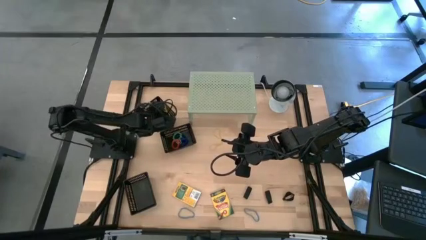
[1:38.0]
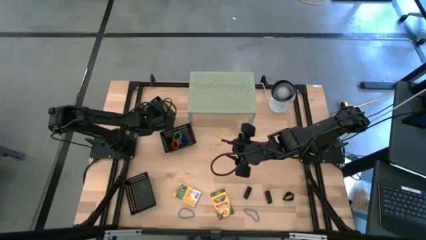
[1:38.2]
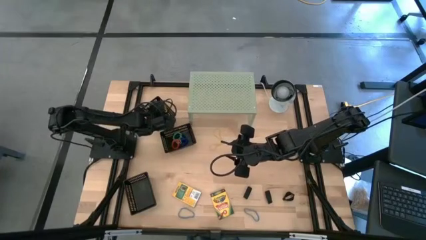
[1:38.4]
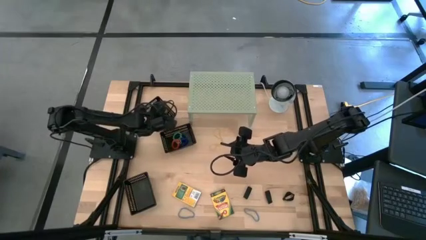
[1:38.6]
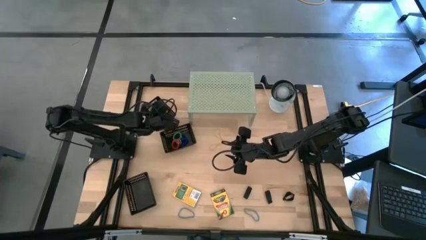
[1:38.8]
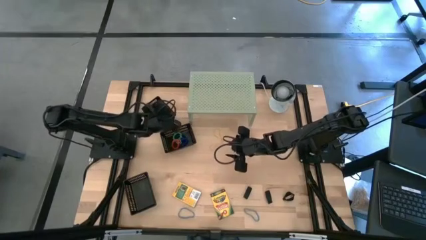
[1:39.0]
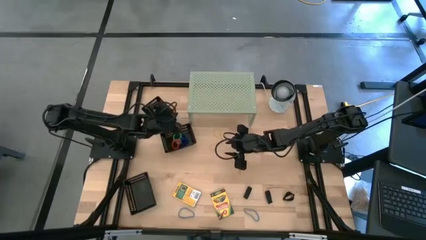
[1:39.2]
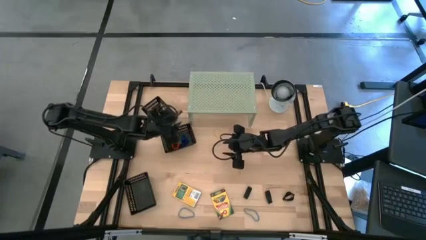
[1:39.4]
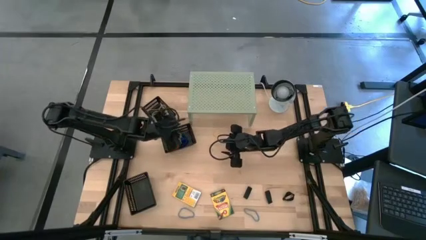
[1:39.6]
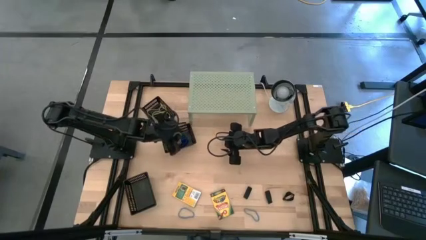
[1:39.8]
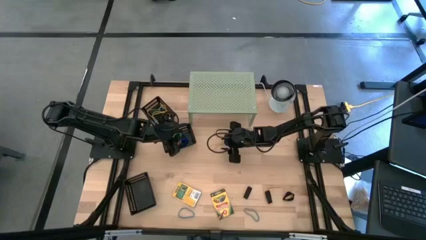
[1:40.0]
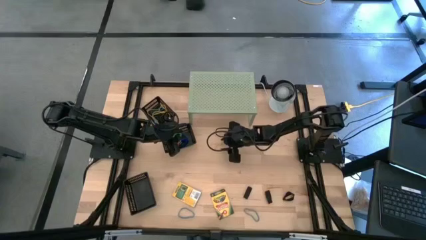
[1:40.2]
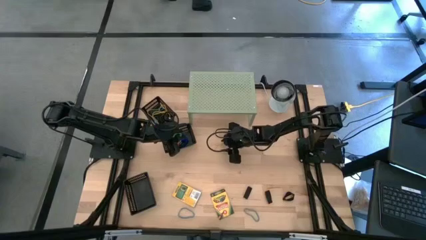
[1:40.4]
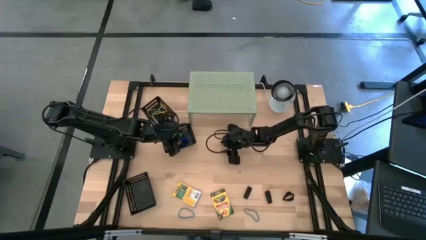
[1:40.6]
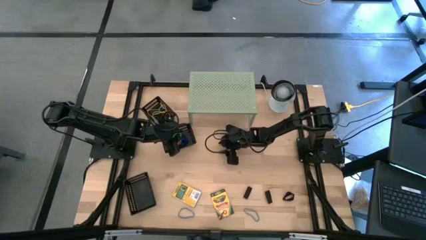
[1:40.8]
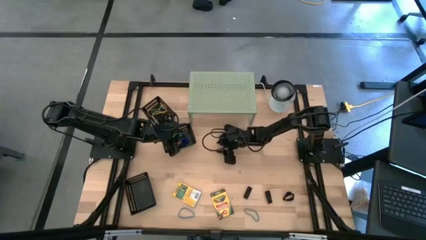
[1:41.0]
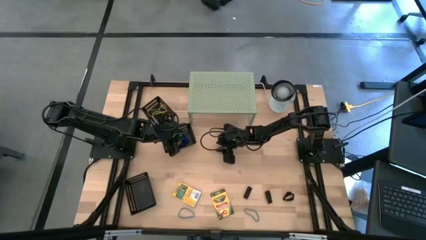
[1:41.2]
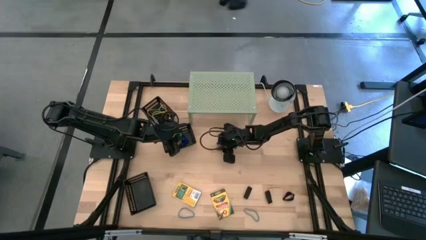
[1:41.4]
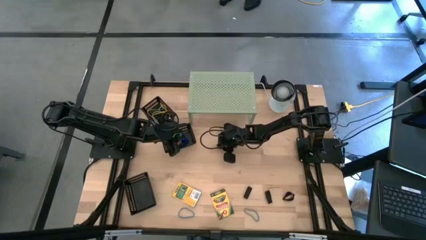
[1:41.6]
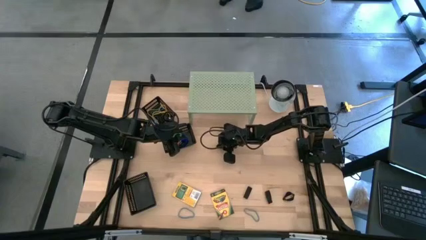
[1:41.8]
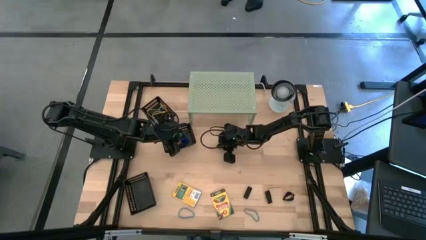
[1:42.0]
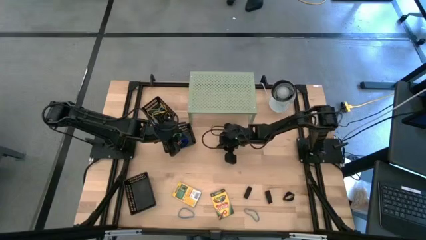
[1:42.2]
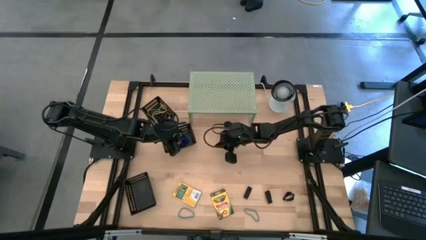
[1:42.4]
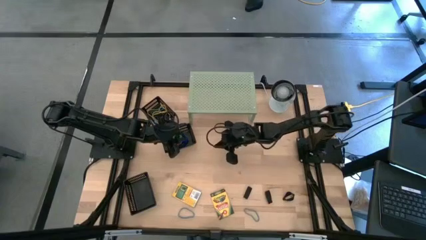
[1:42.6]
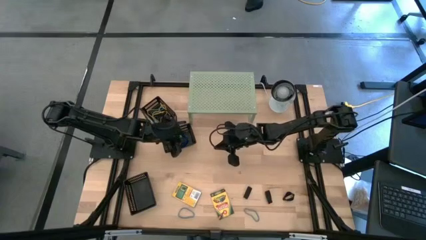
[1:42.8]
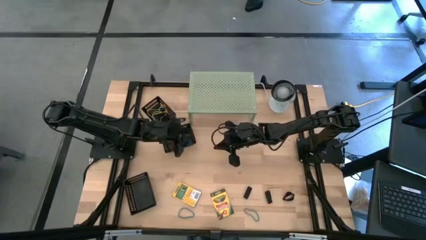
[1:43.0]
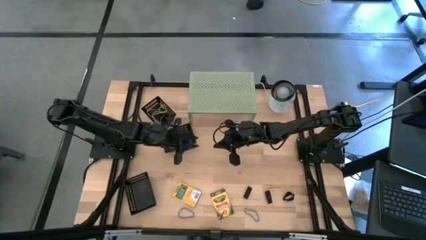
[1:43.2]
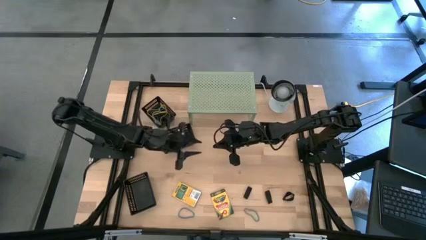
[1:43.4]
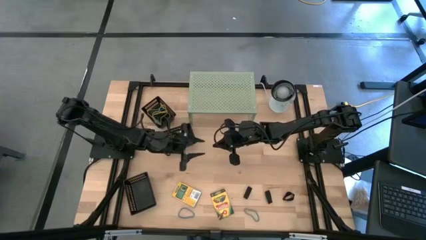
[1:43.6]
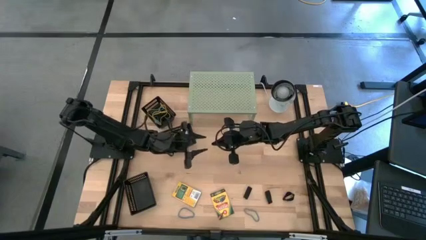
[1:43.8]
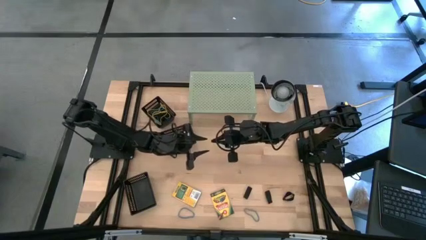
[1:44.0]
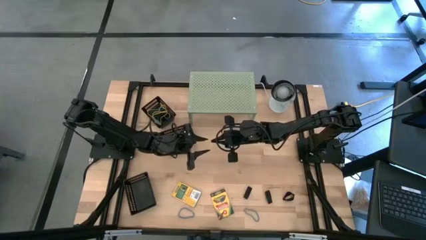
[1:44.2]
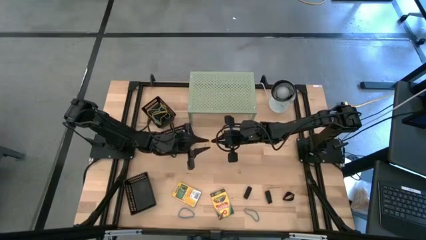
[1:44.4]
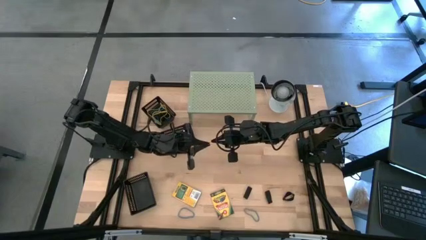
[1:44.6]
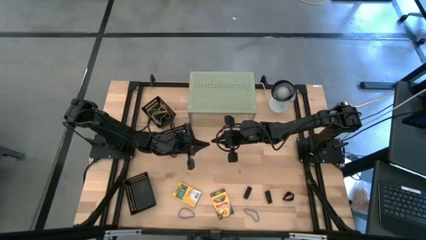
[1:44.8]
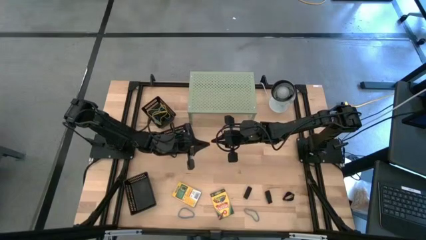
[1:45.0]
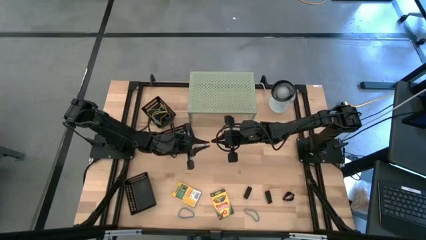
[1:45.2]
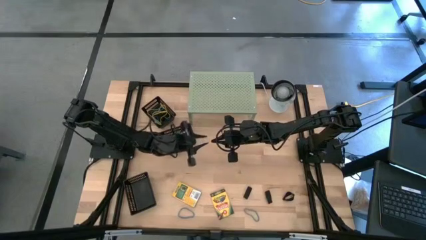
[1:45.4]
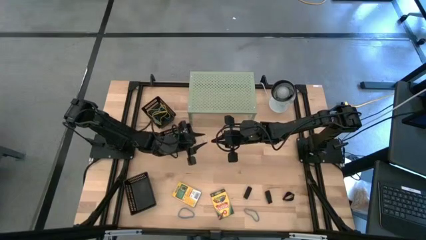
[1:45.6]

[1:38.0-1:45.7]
Task: Pick & Place Office Desk Supplies
Put the yellow rubber band into the top black bin

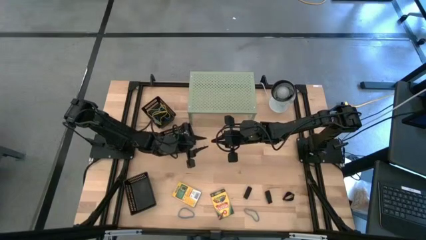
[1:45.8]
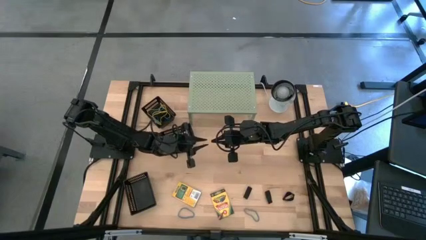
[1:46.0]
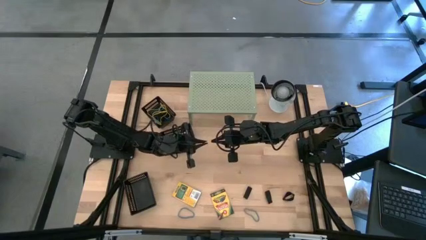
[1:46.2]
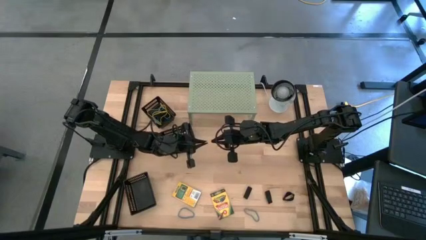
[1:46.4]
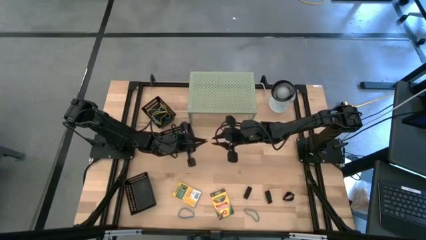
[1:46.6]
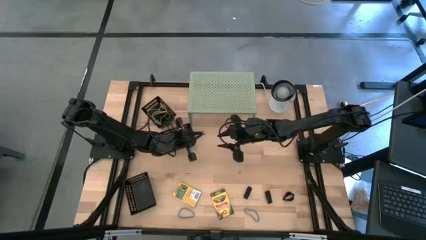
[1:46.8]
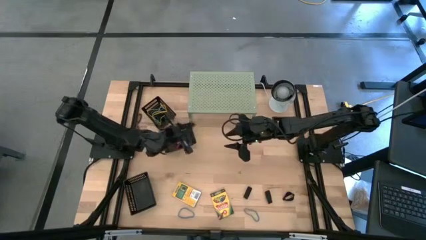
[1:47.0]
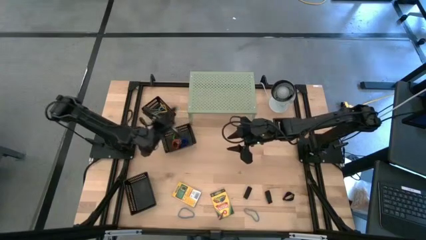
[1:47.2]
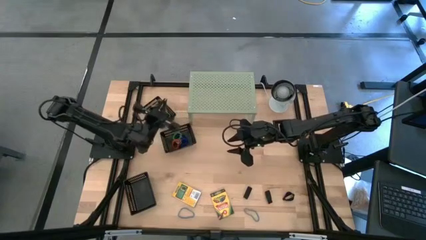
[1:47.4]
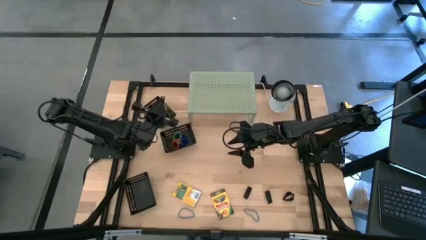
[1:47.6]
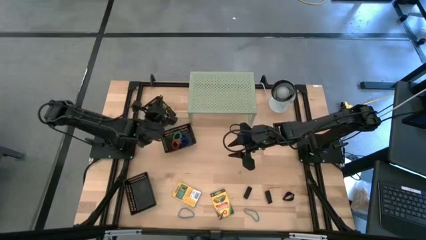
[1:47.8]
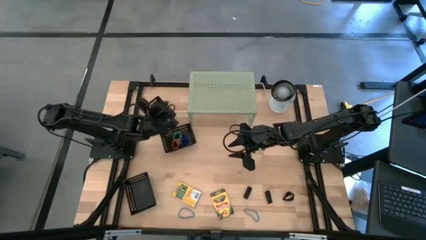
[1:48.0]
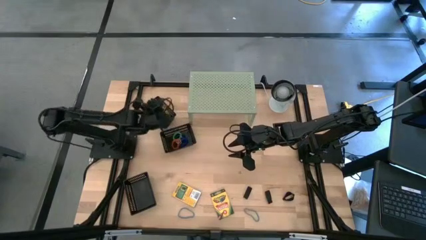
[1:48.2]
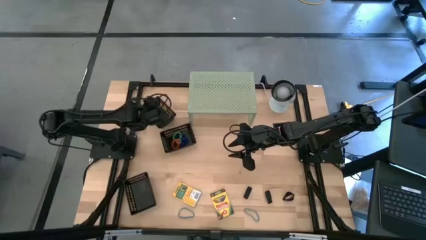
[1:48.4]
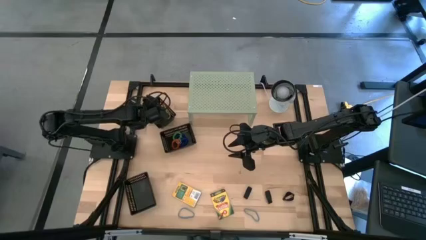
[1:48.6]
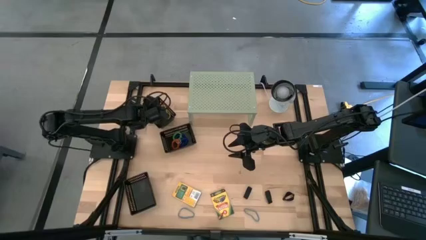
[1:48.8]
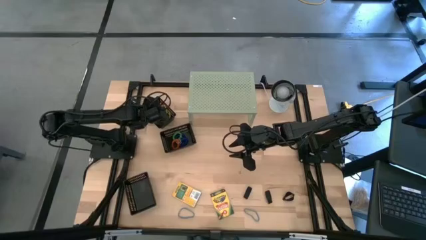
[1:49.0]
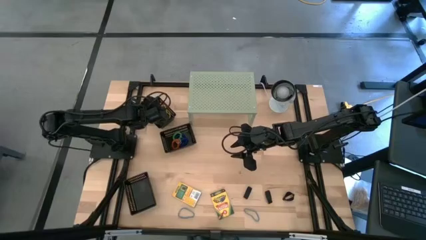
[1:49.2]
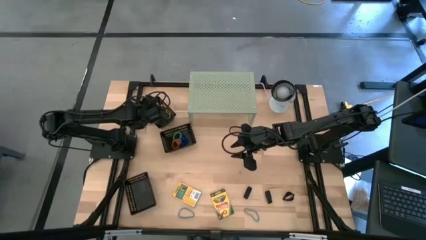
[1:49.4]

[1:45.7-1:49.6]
Put the yellow rubber band into the top black bin

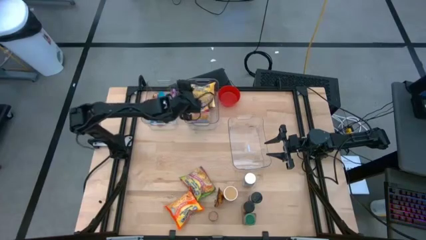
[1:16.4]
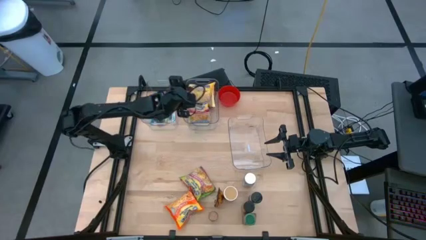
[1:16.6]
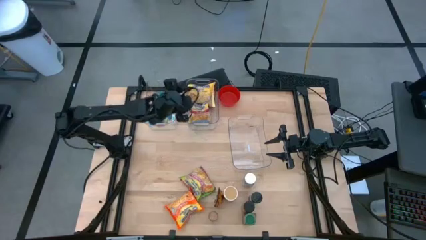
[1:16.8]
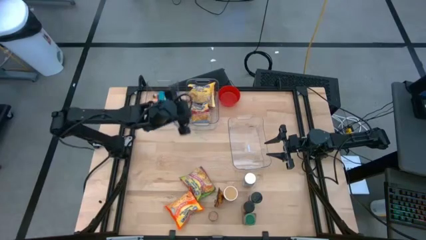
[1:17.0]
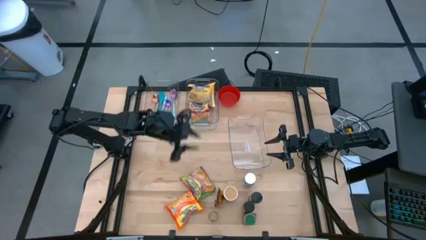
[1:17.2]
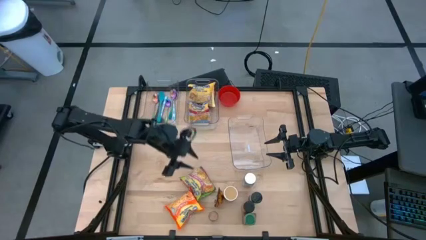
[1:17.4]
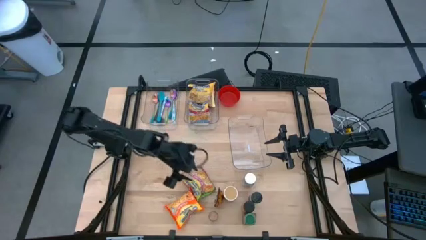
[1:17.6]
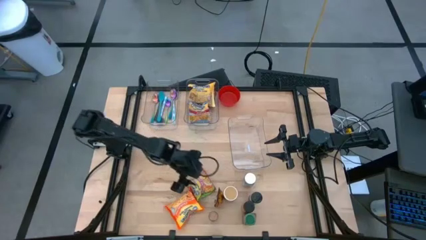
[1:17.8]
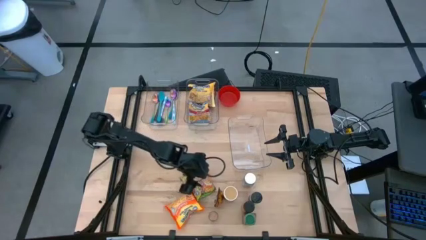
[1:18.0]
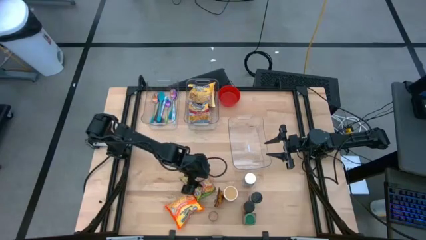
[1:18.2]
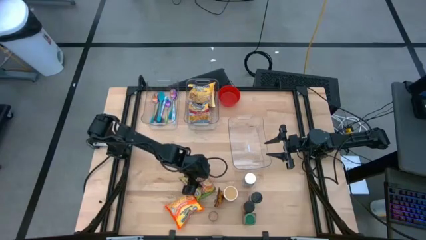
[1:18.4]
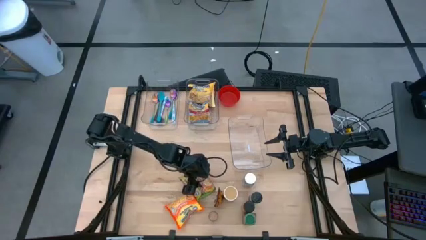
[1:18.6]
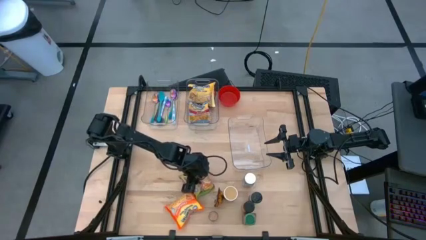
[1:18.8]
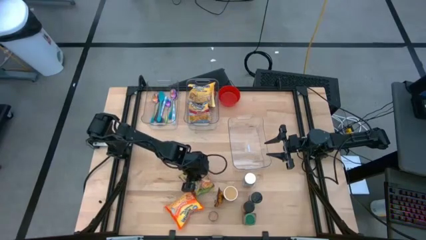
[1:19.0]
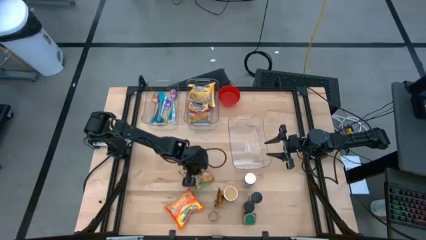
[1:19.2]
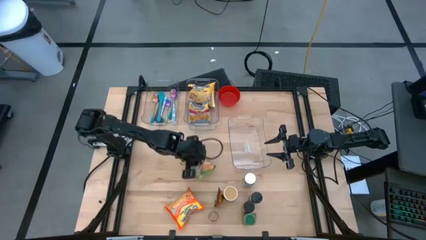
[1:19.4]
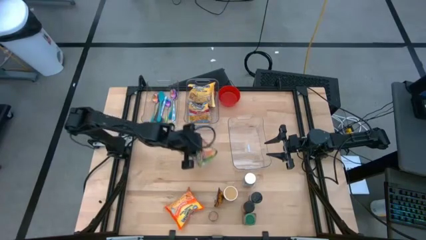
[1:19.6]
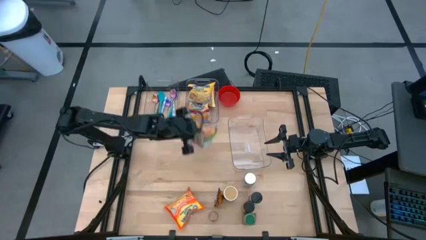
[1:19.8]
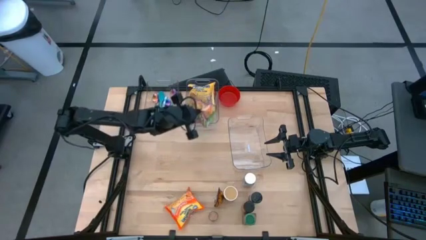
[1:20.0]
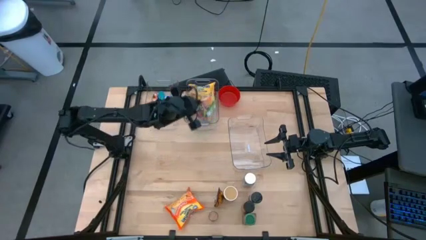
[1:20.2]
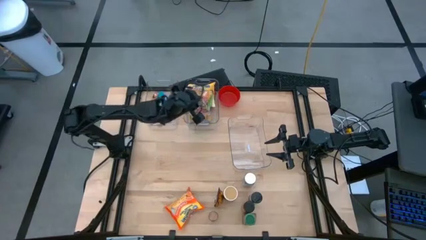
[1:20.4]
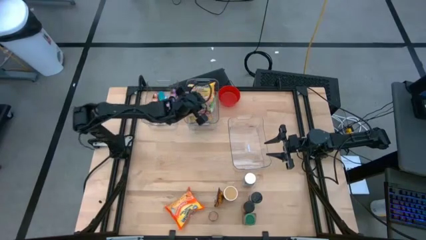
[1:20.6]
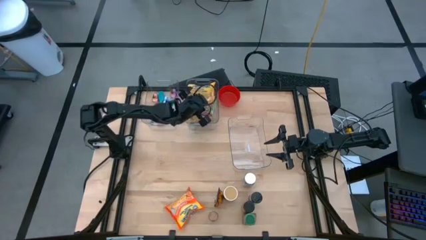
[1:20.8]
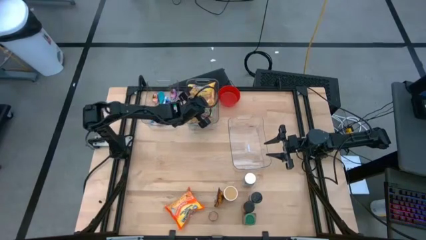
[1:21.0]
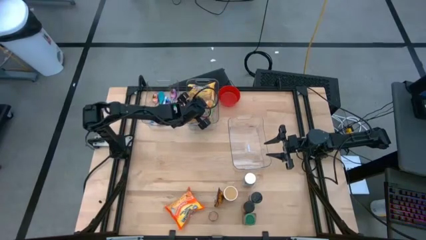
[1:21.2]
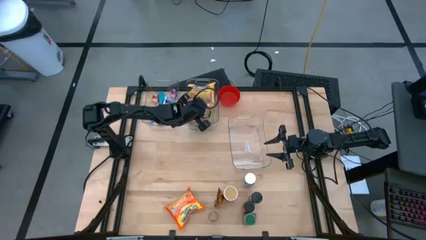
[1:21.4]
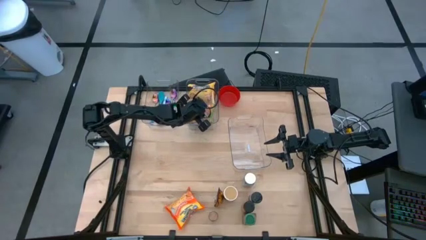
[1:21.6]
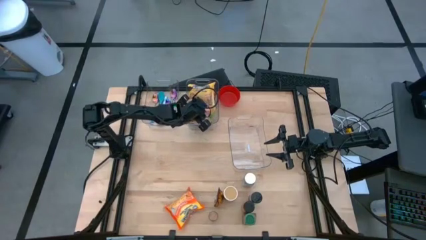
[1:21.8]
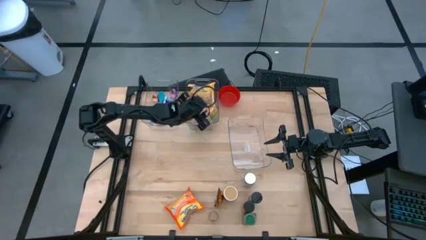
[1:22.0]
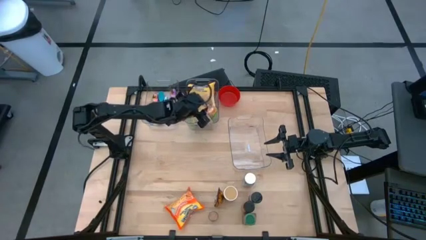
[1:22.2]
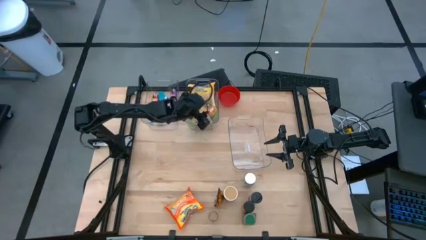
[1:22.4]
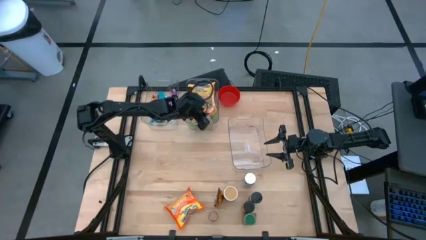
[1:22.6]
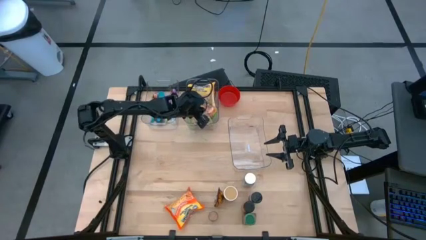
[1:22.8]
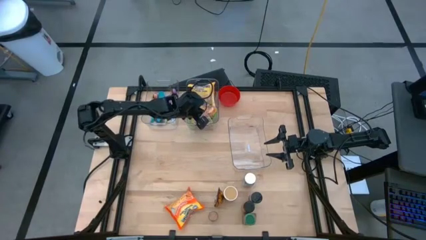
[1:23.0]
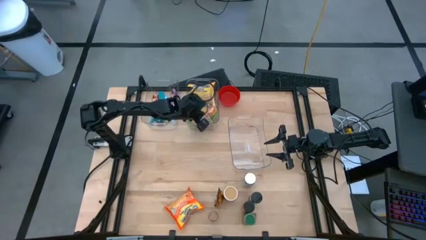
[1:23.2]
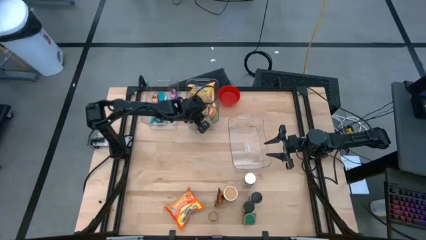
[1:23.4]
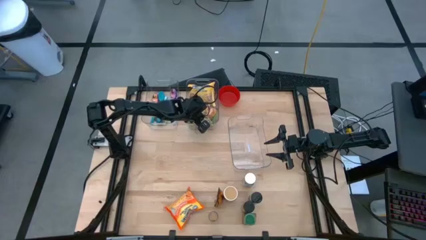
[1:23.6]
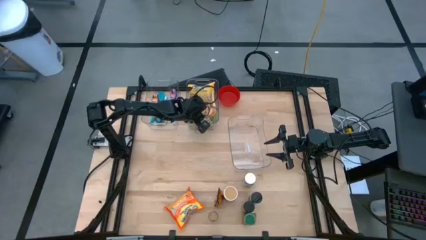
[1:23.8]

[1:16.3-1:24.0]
Task: Pick & Place Food Item
Put the green noodle pack into the top right transparent bin
